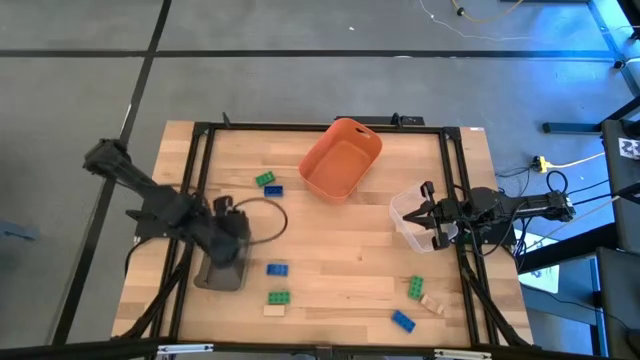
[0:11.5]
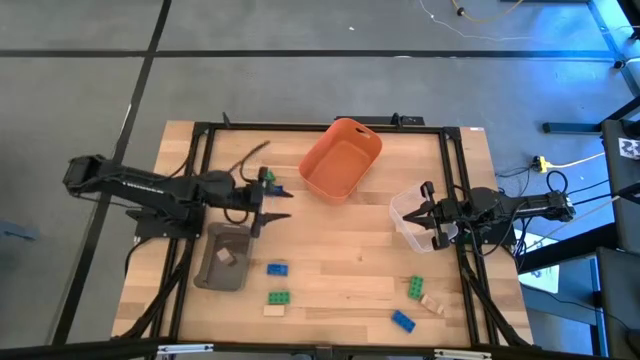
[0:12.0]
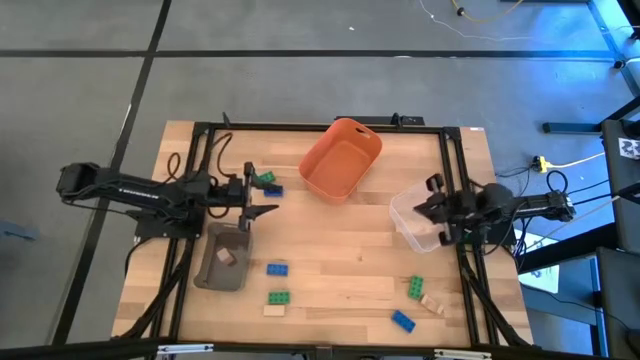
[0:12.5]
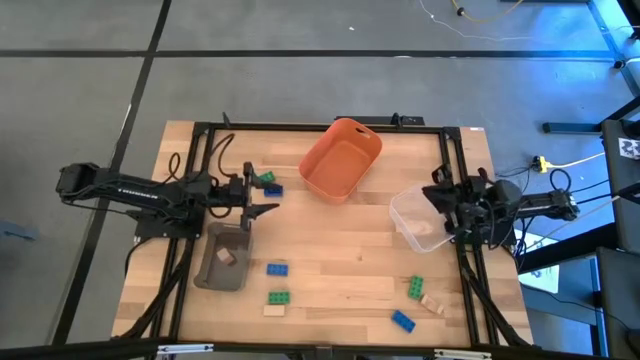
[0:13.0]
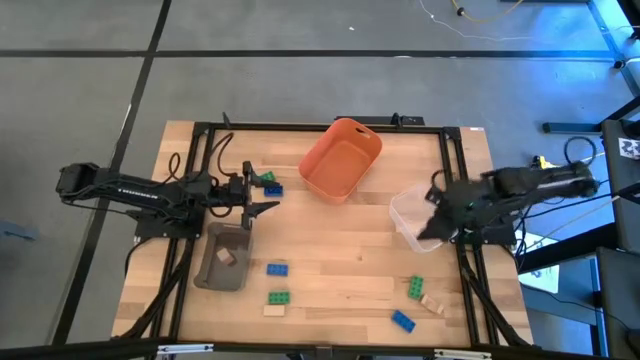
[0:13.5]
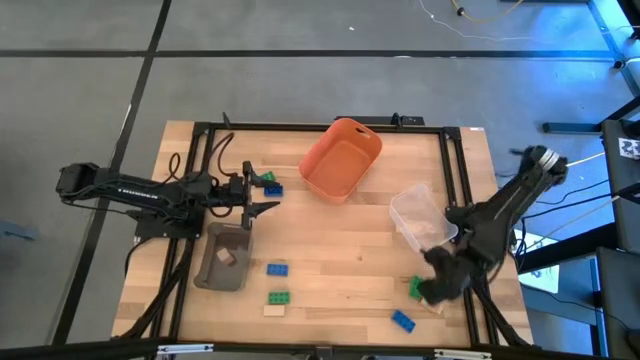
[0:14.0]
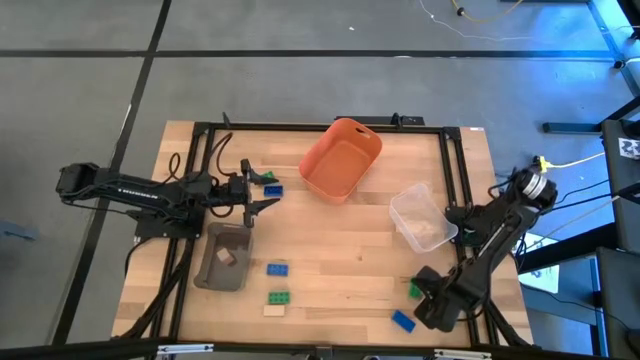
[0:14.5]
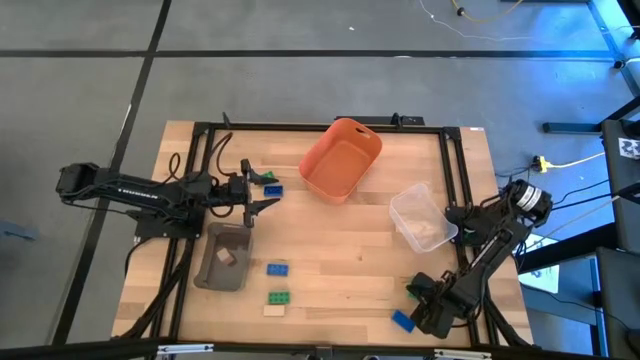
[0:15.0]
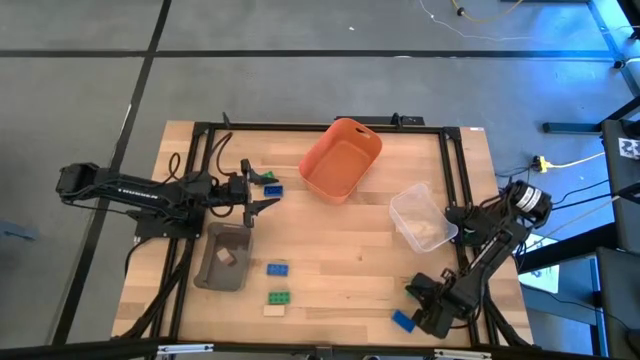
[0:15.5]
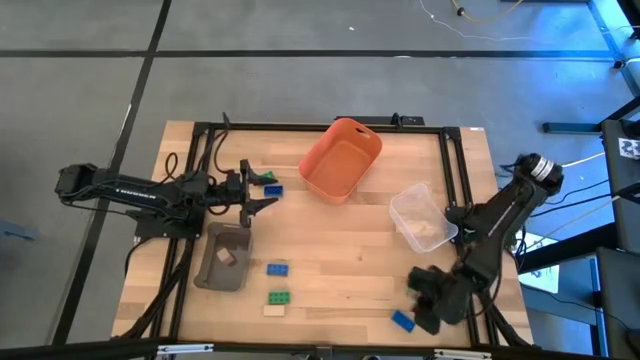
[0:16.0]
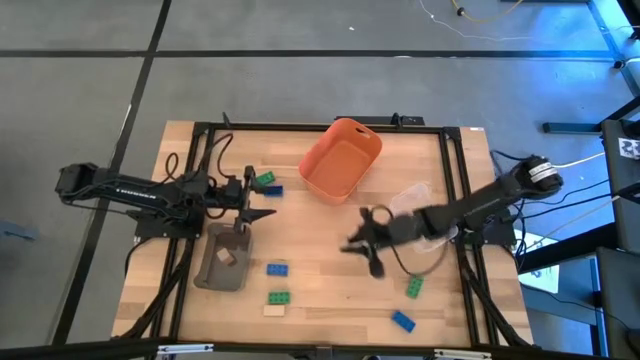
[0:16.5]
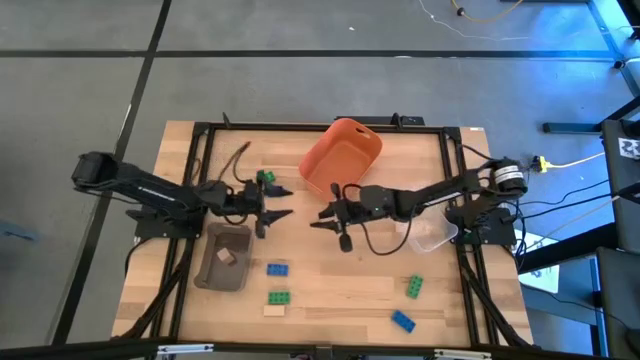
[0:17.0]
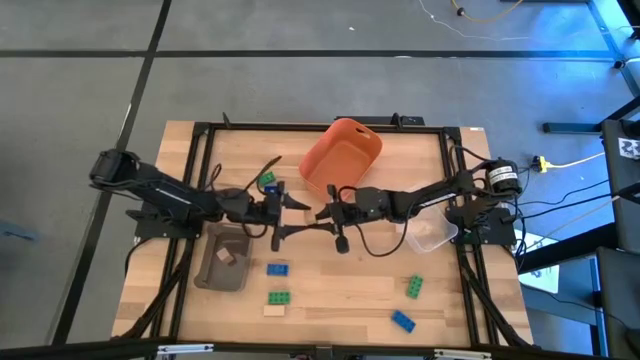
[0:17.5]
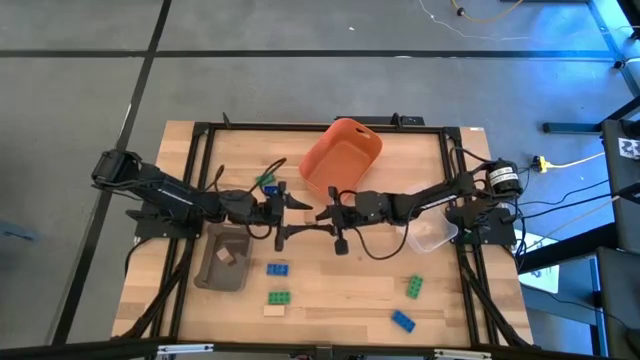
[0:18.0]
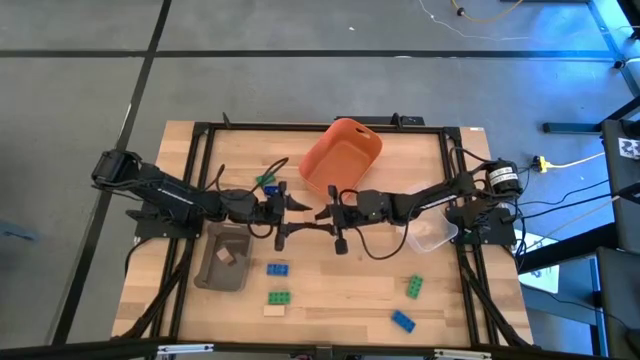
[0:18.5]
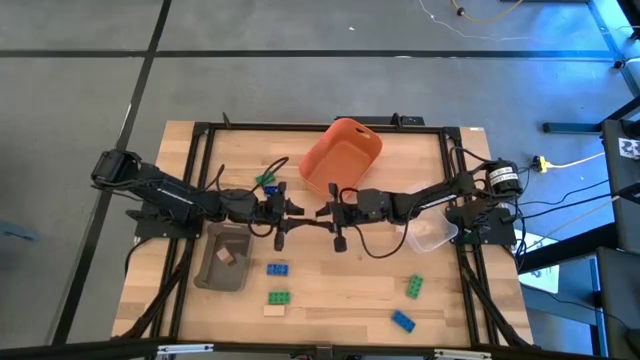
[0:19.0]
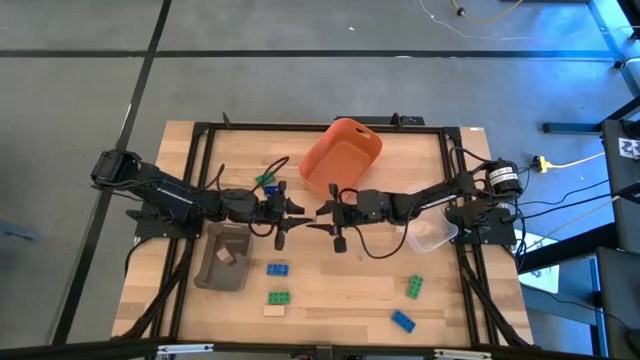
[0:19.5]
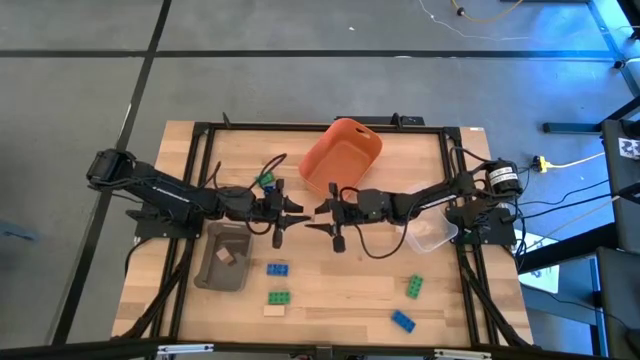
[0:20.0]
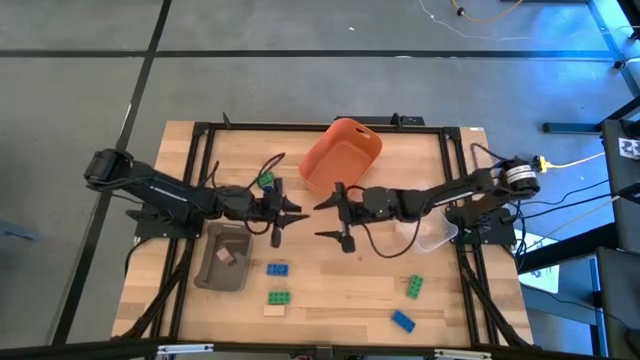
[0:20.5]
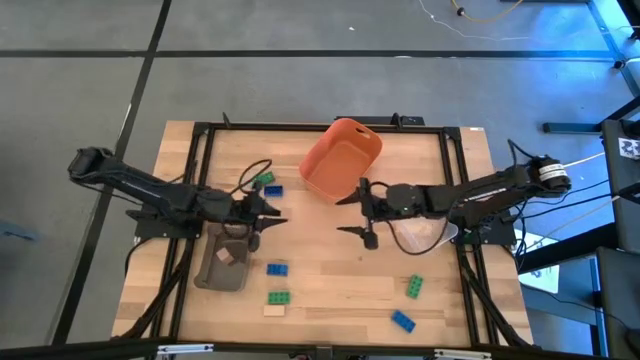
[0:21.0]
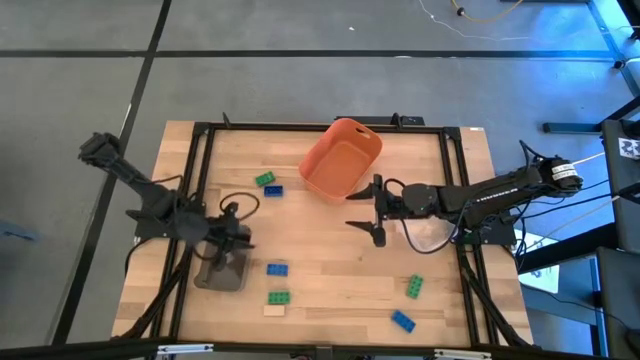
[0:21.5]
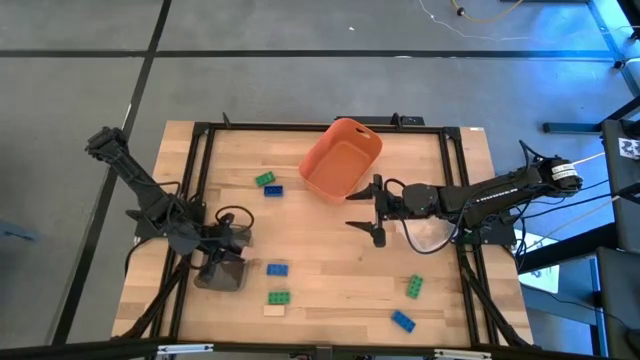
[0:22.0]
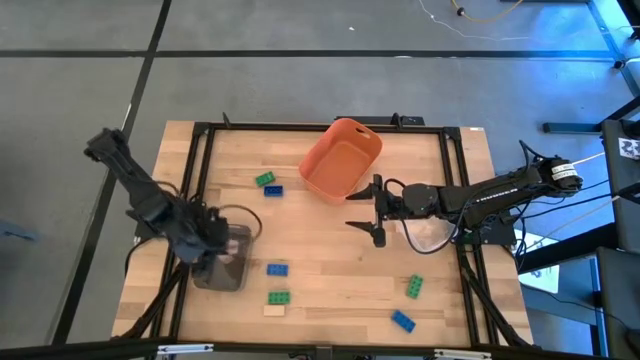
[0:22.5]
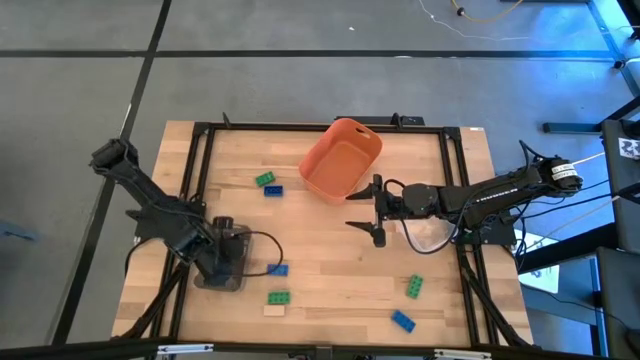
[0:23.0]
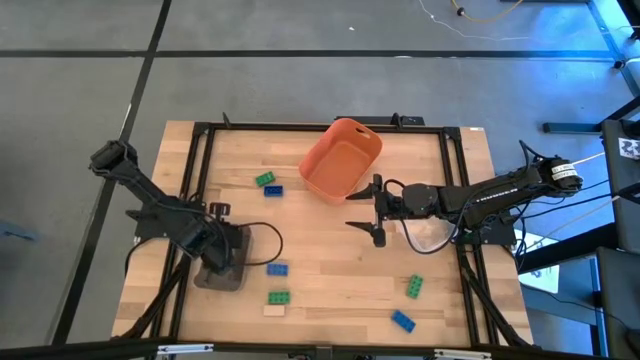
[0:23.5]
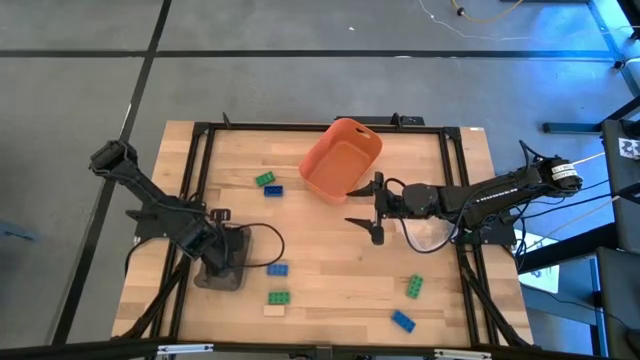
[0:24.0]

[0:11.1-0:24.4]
Task: Sort & place blocks by color
Put the right brown block into the black bin

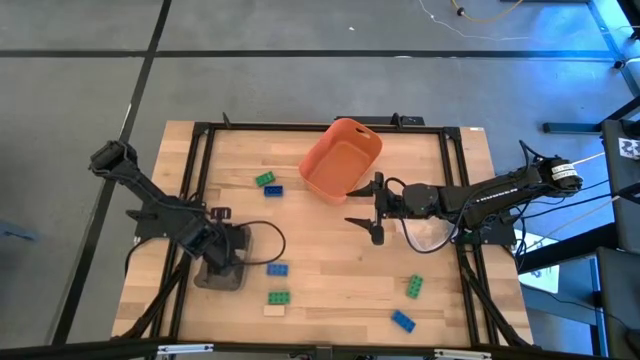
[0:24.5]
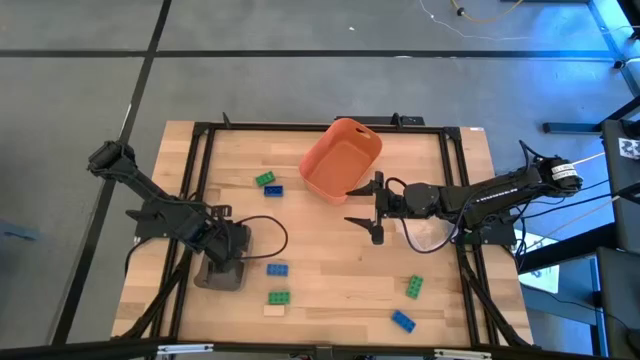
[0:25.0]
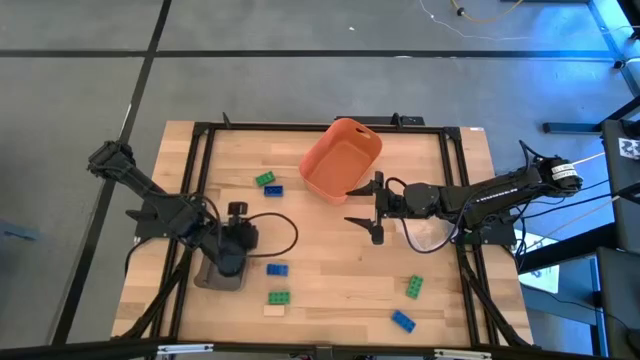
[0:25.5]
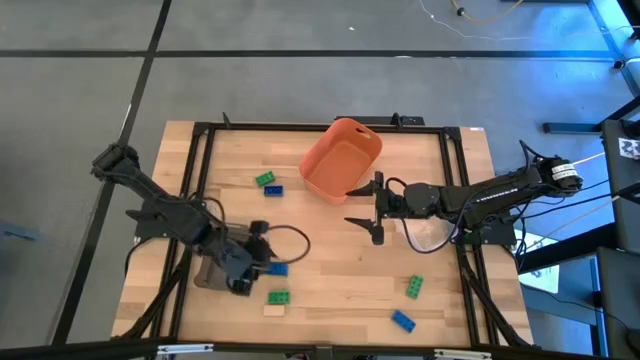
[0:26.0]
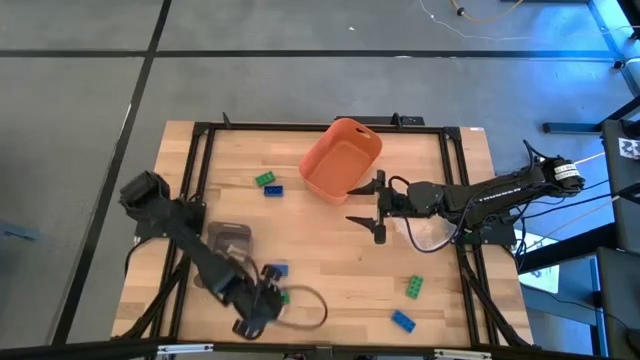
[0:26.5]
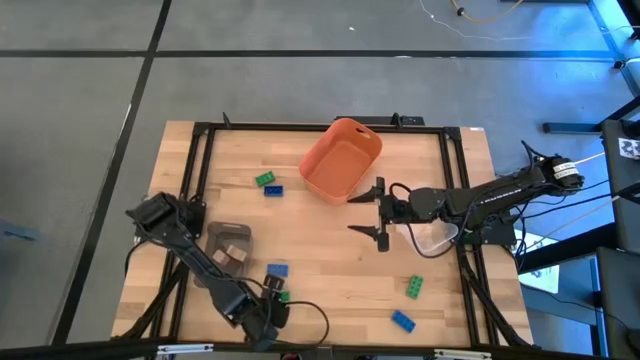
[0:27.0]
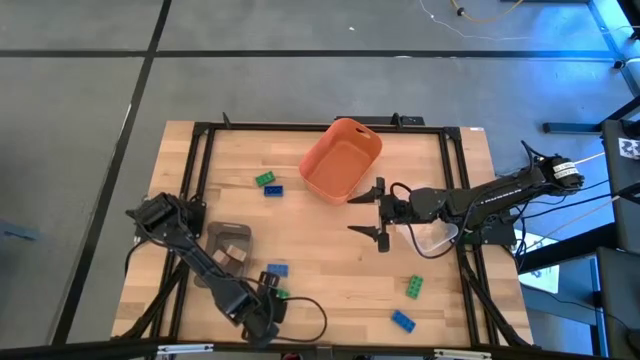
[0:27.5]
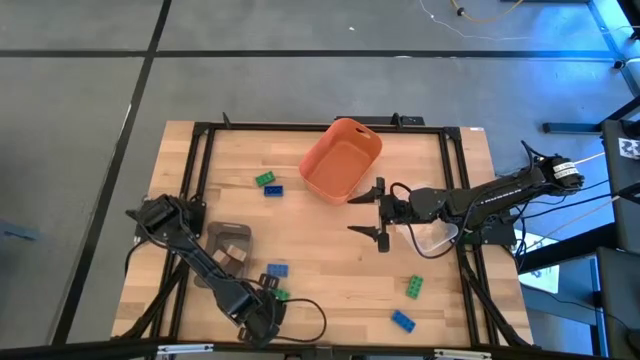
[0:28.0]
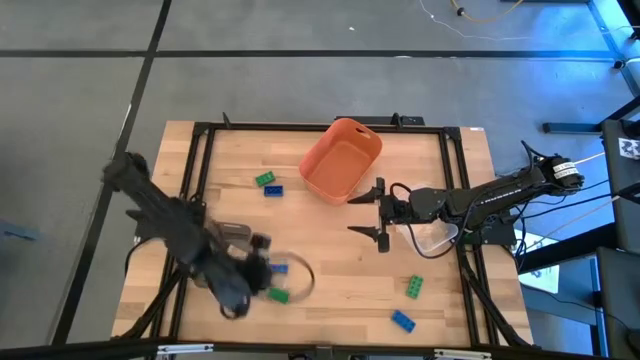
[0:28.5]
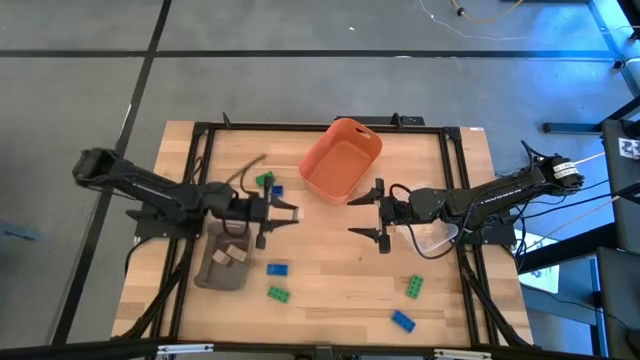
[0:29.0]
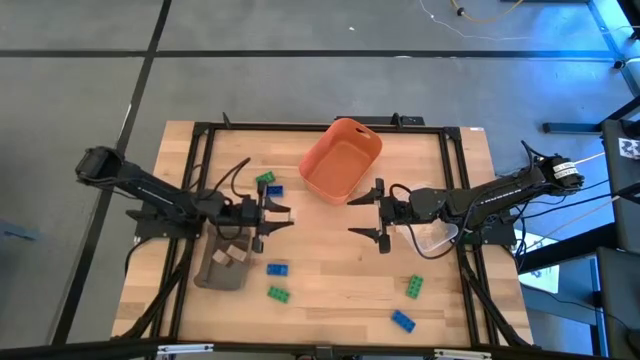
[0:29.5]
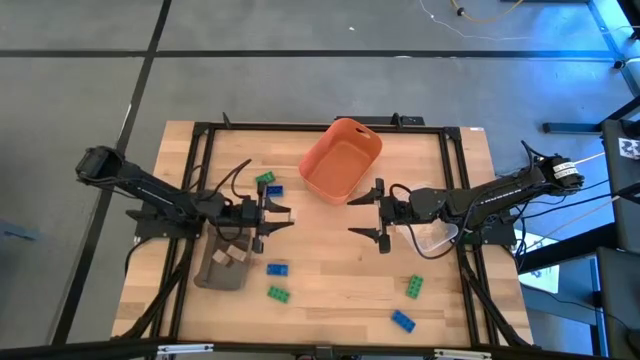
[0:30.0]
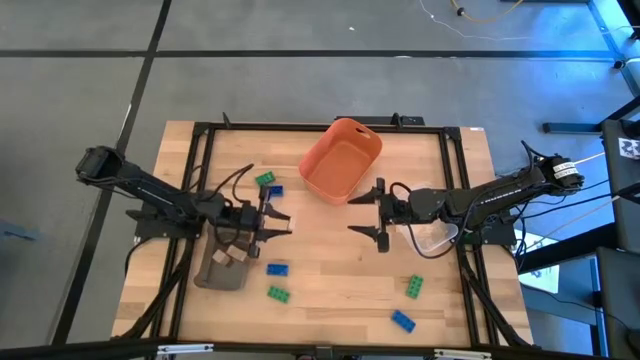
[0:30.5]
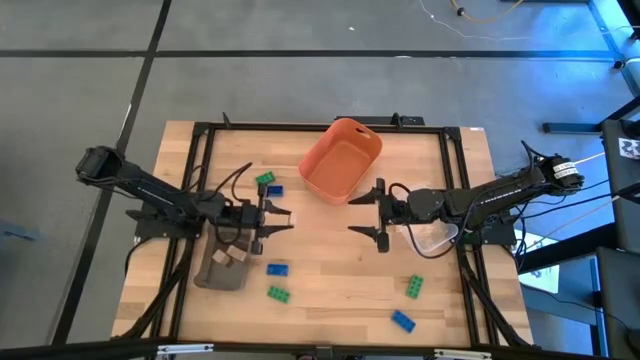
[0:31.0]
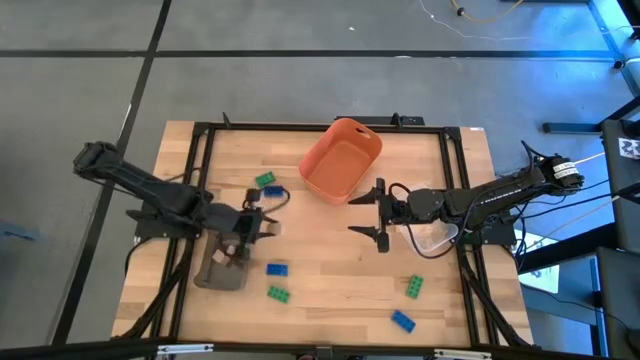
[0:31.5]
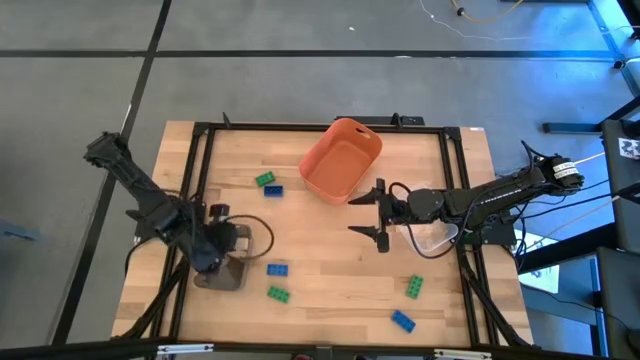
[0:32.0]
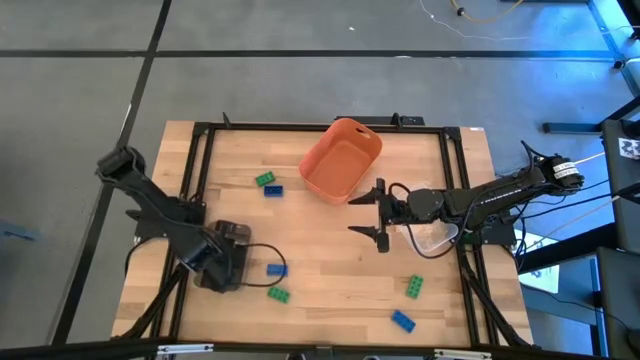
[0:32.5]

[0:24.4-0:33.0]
Put the brown block into the black bin
